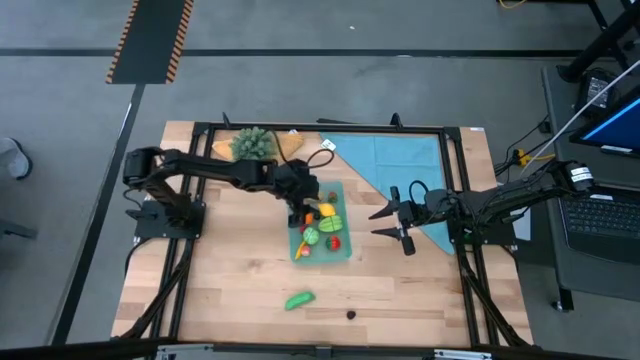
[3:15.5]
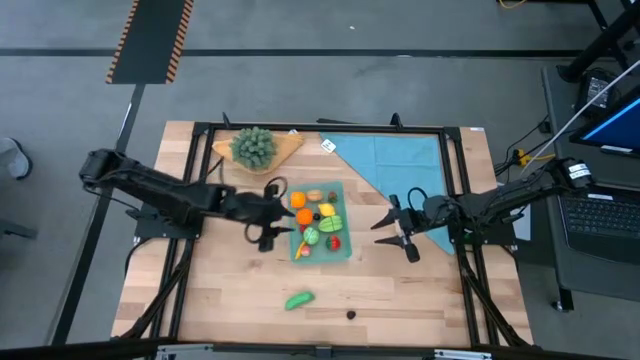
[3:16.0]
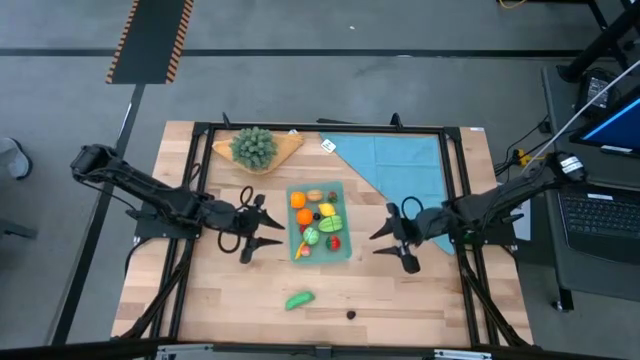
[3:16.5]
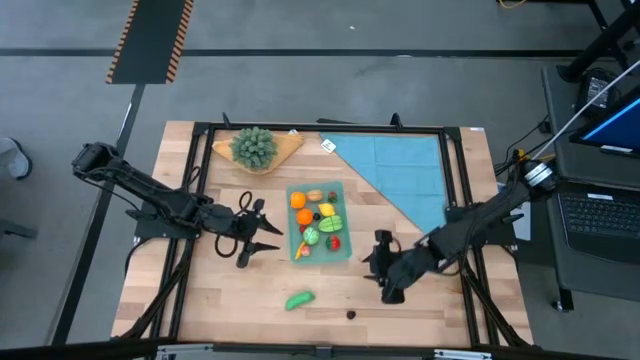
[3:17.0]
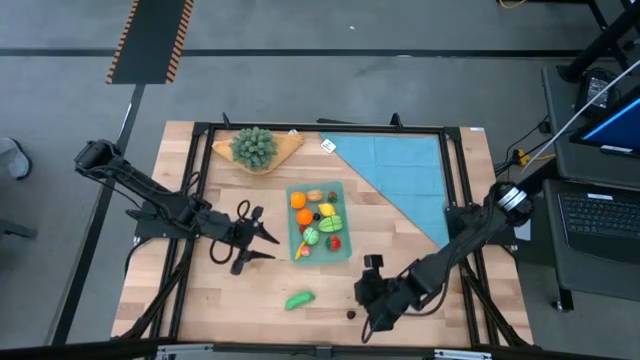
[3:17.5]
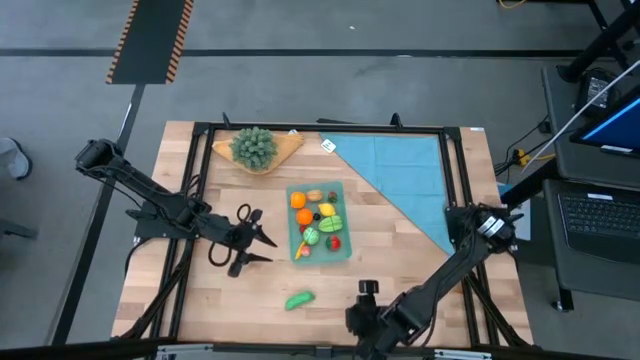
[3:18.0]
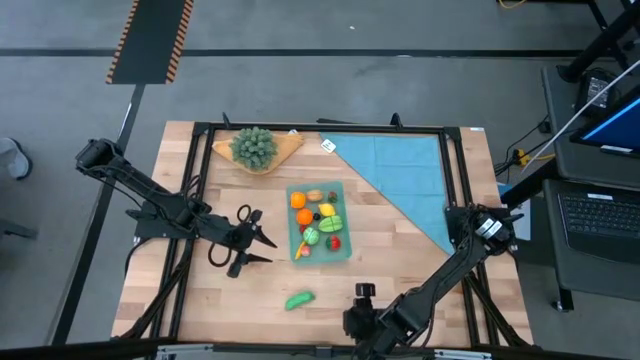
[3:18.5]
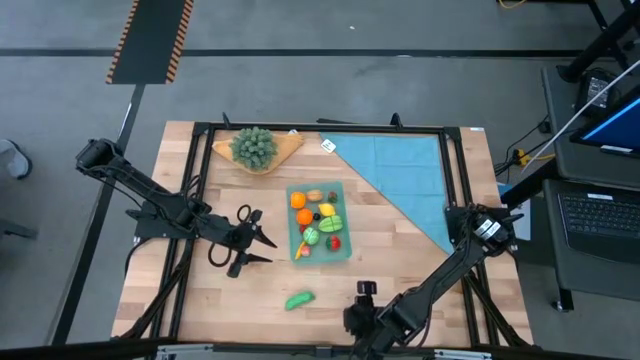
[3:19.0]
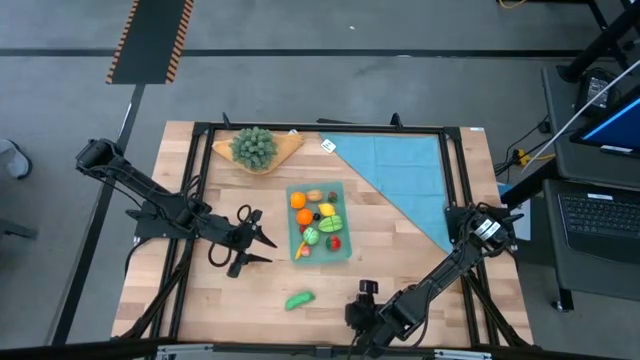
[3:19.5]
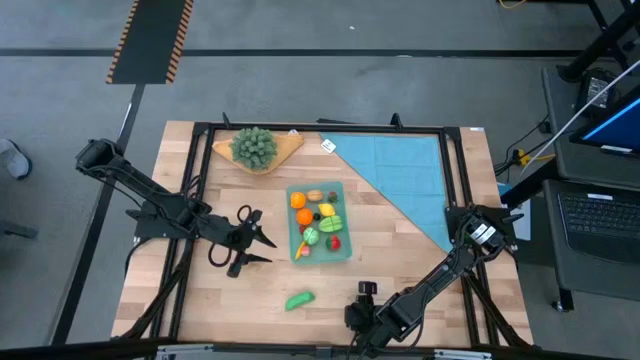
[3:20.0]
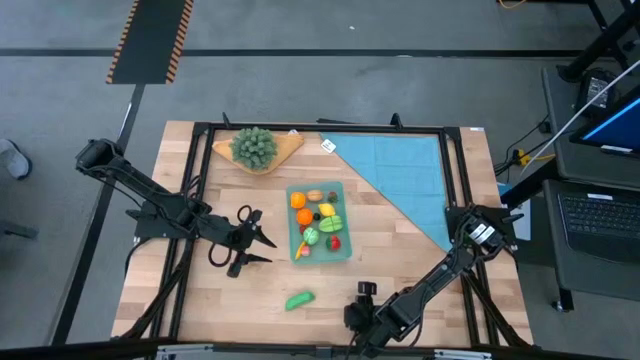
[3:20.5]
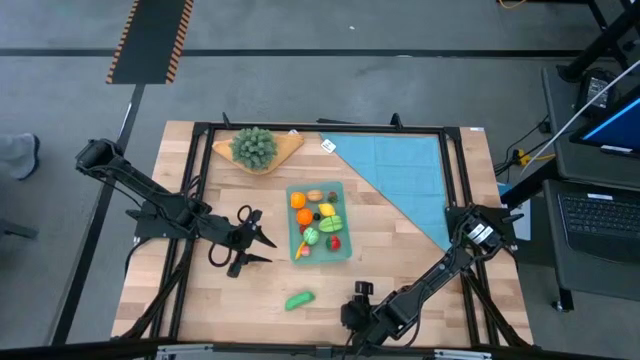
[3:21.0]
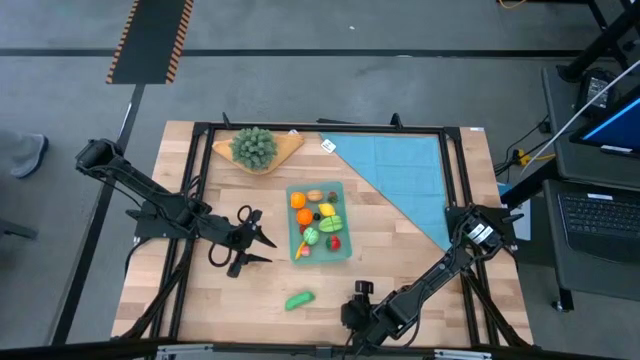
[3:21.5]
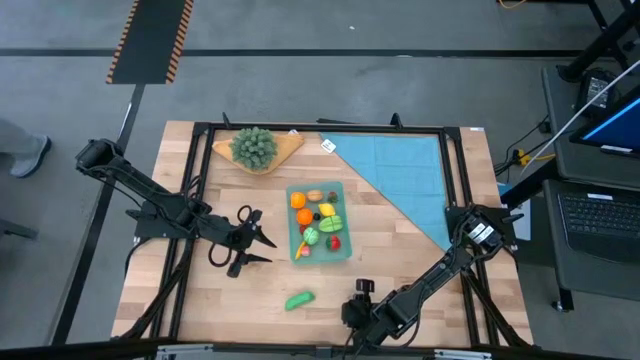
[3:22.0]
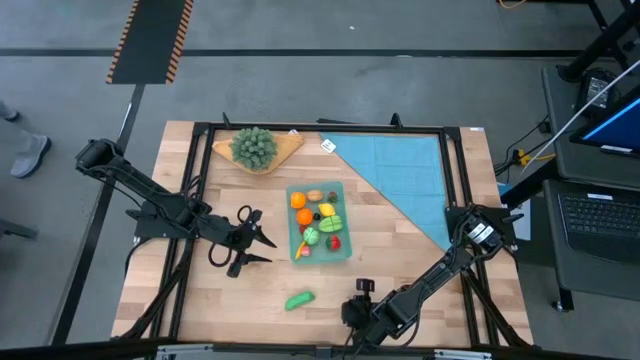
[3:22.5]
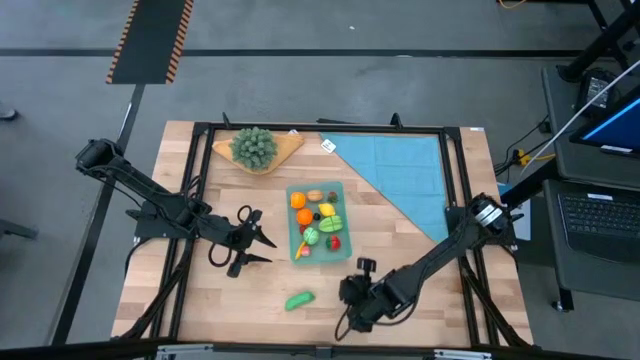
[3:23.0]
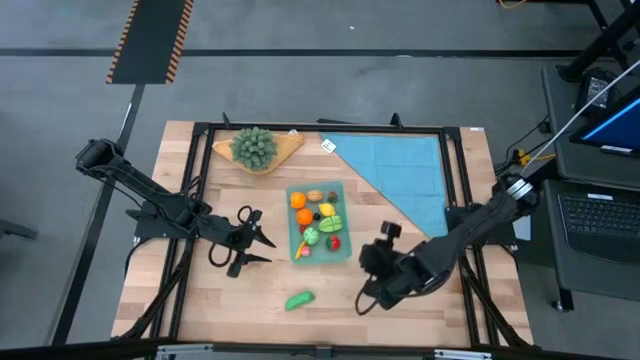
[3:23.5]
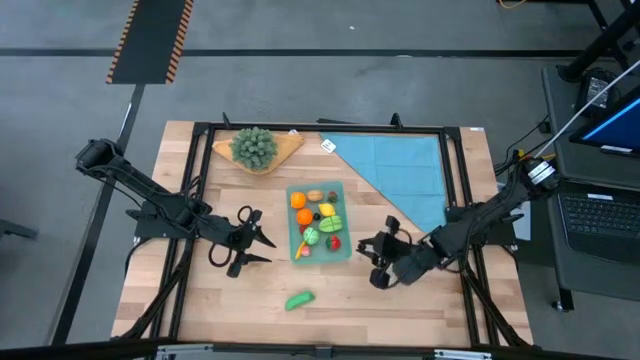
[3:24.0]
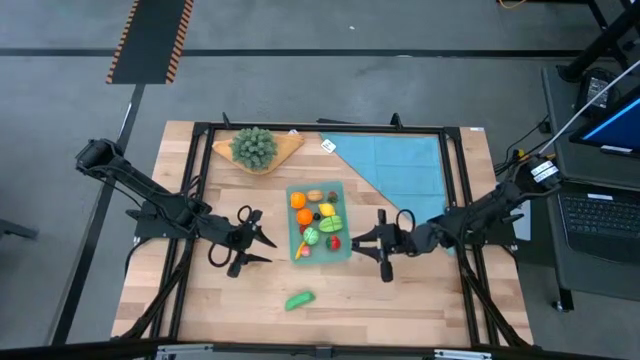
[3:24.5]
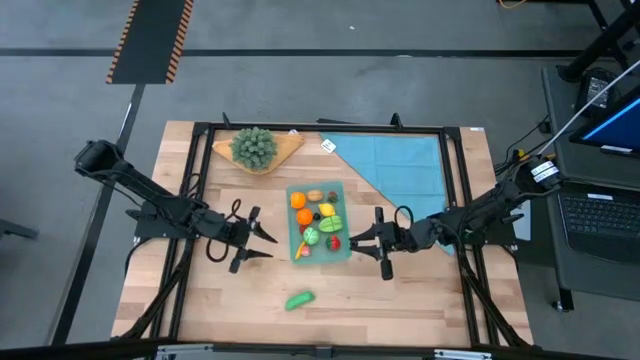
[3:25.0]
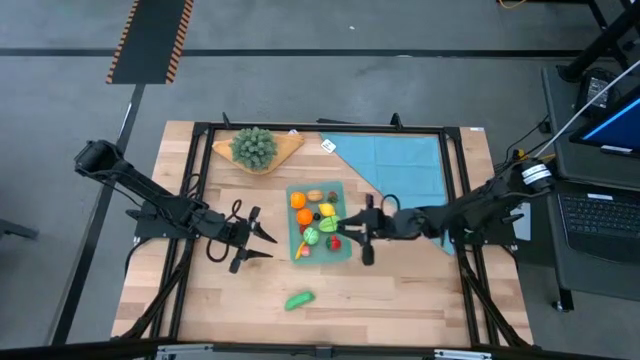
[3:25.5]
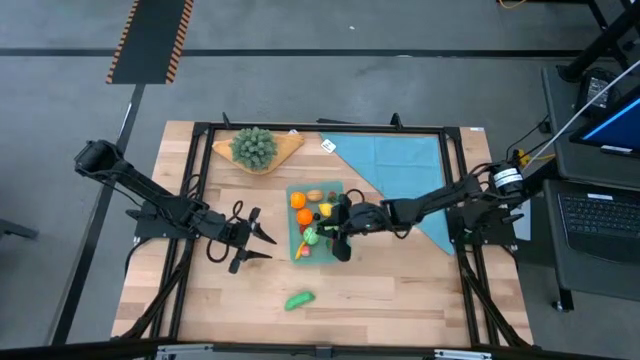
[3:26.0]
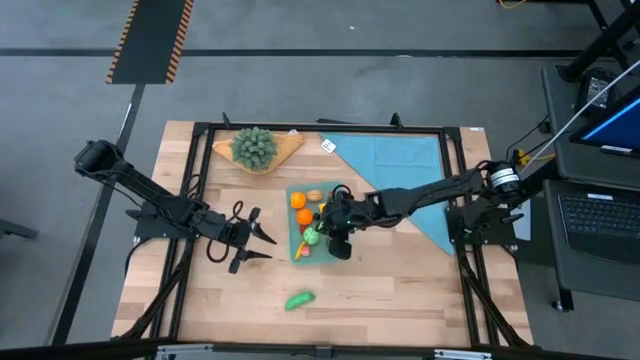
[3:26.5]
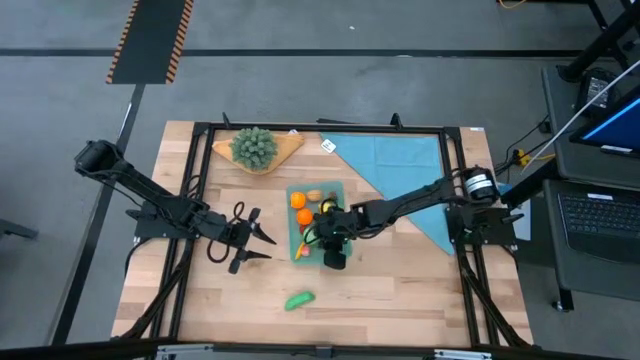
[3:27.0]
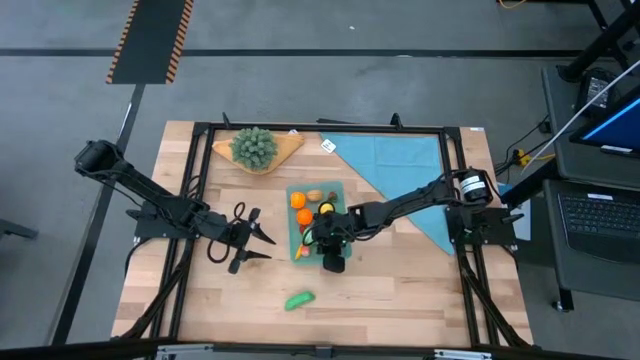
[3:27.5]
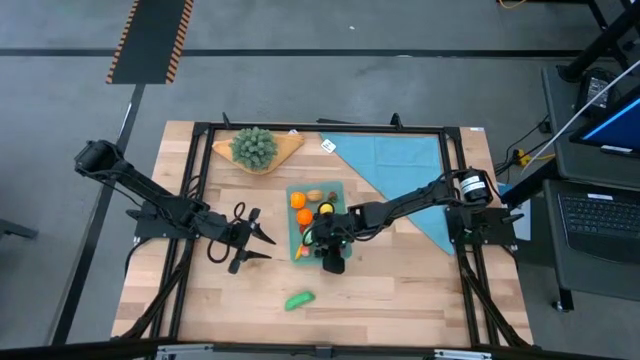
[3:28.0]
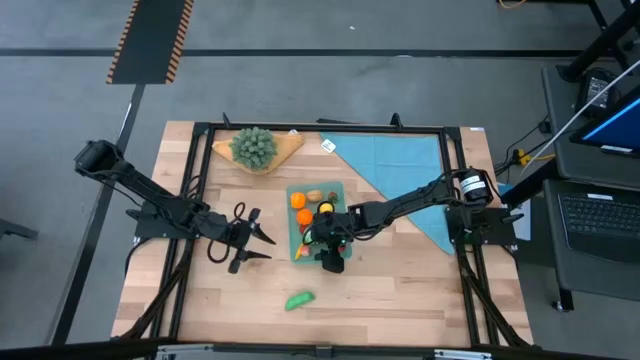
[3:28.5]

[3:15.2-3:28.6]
Task: Pick and placing Produce into tupperware
Put the berry into the bin

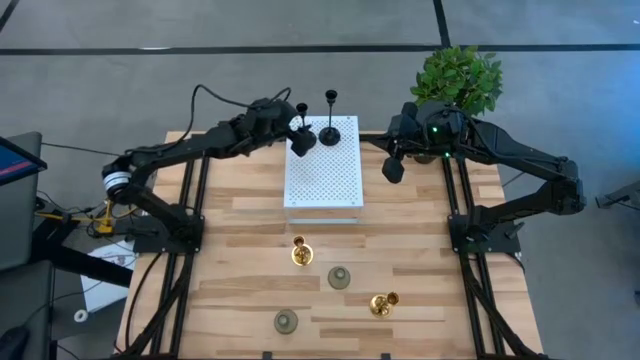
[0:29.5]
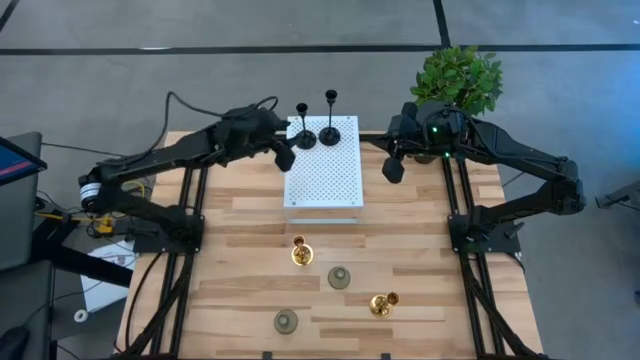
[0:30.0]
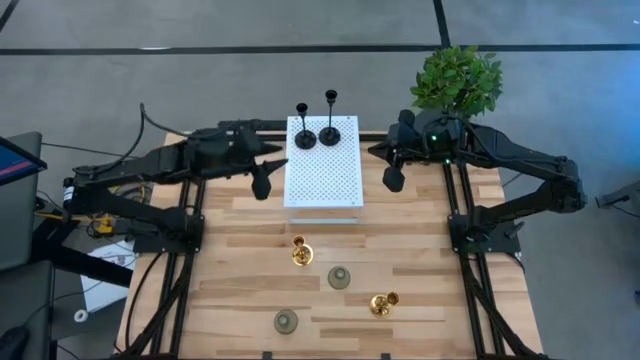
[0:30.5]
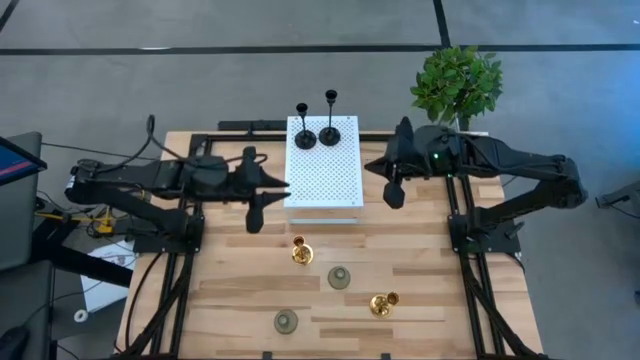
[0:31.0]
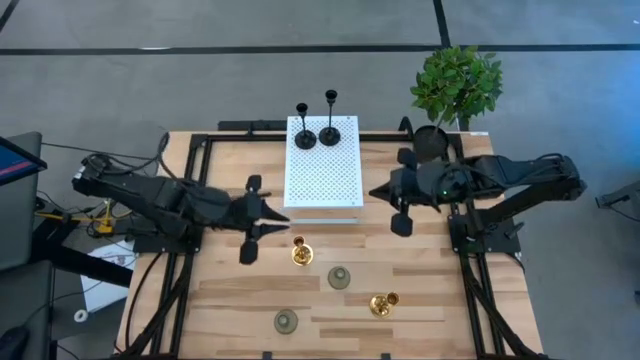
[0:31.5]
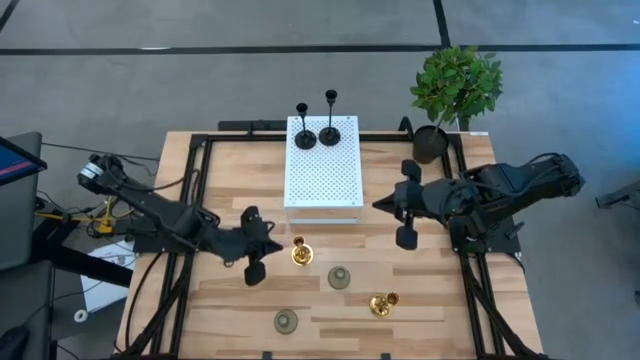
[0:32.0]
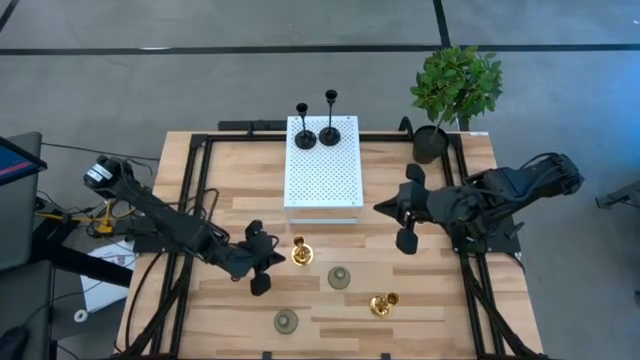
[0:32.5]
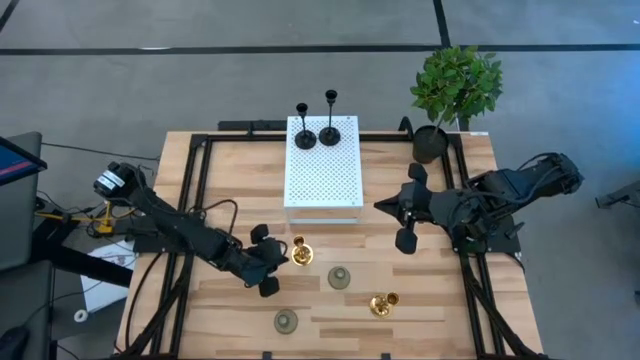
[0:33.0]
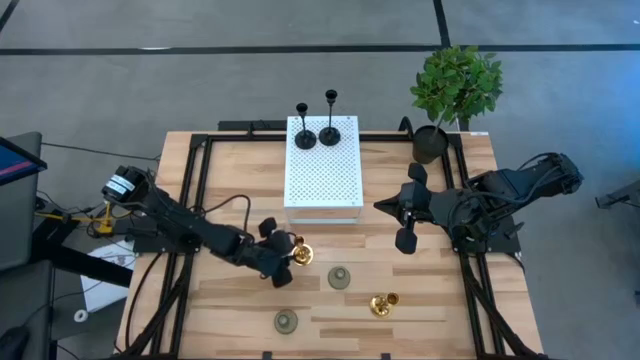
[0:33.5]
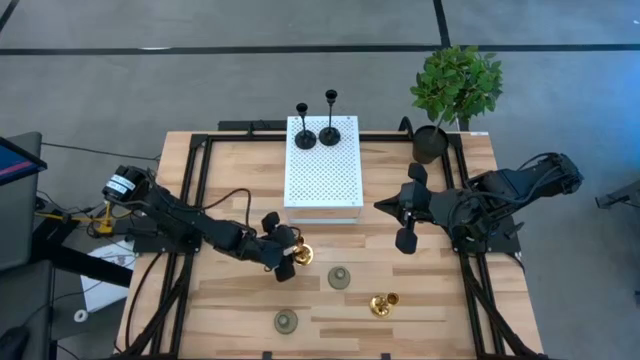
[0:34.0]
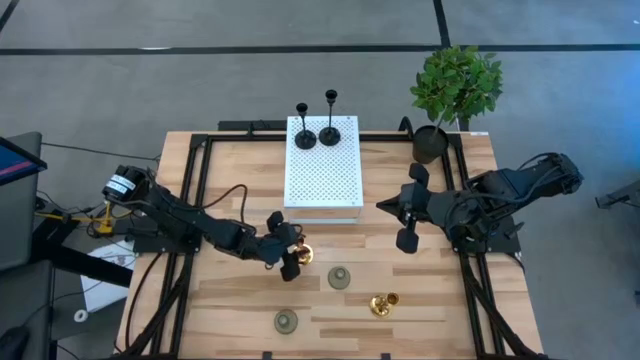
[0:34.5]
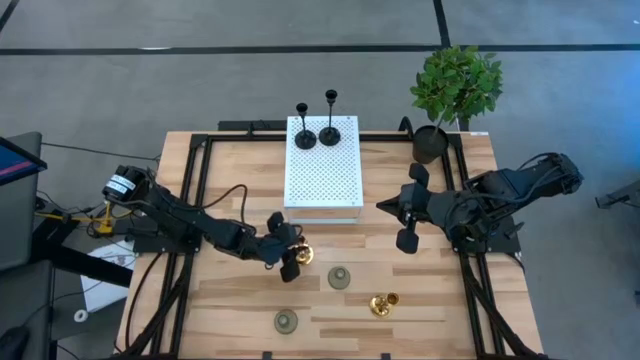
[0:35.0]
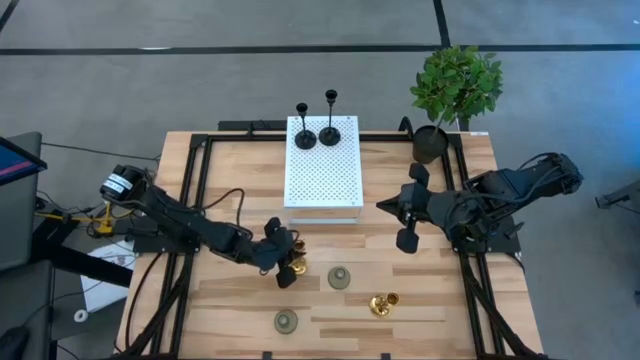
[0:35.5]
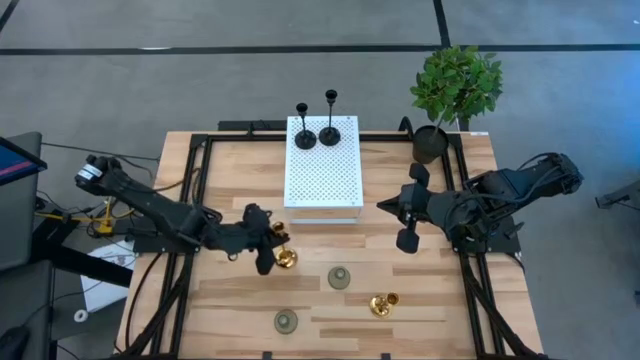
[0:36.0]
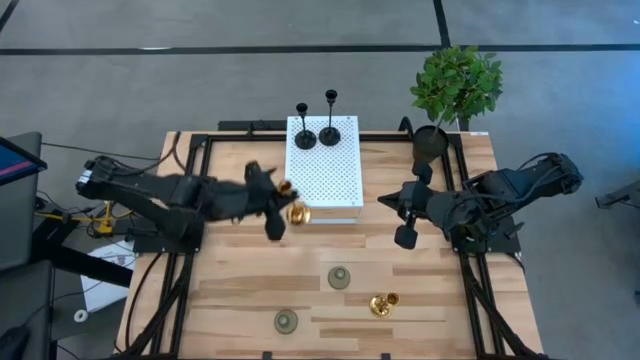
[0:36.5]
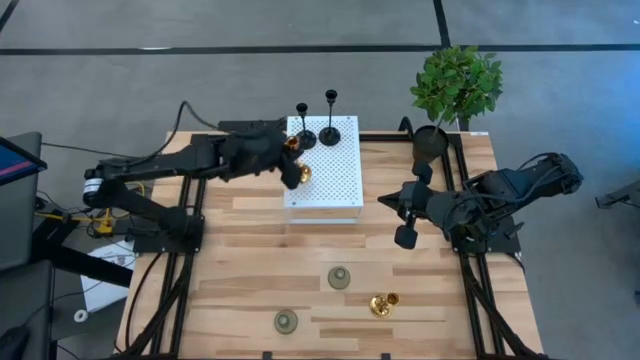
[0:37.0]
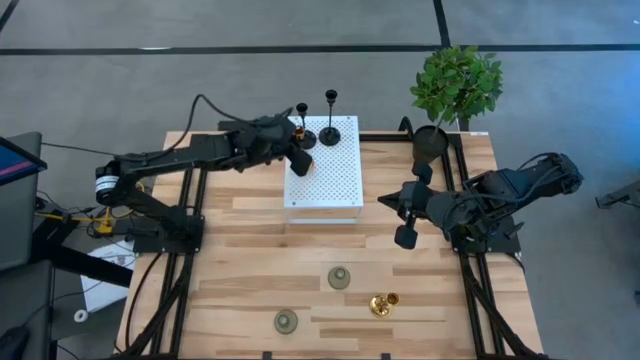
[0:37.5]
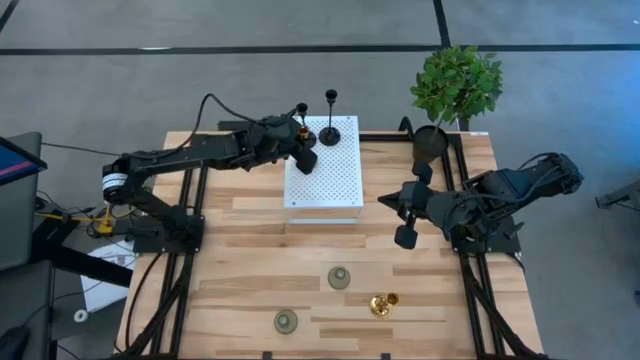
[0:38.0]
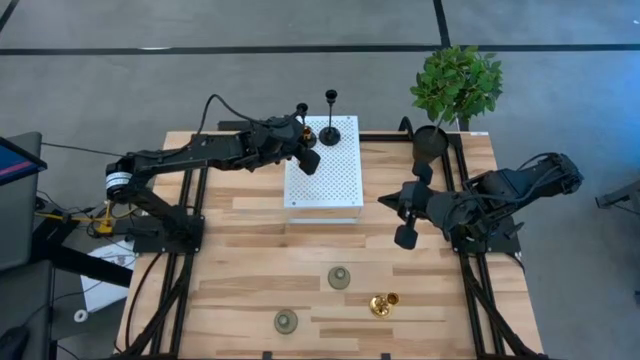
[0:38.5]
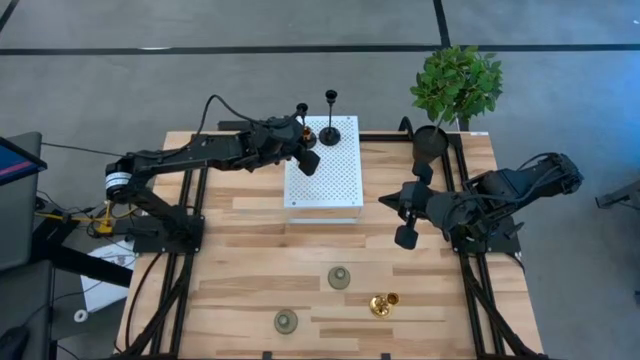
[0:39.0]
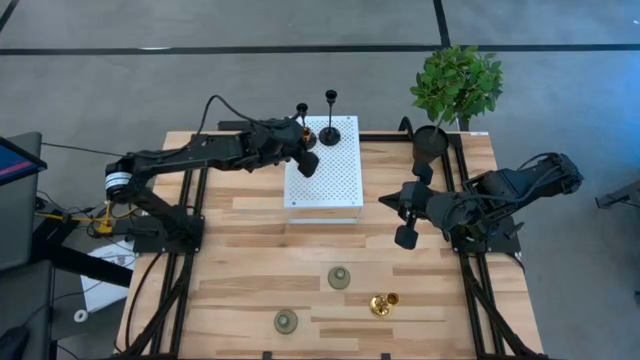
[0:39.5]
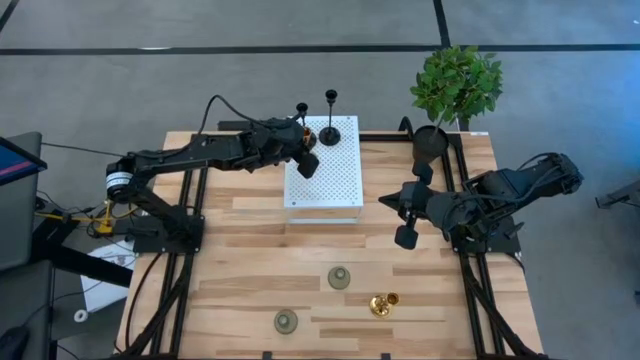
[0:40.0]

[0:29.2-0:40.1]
Task: Pick & Place candle stick holders
Put the top gold candle holder on the shelf
